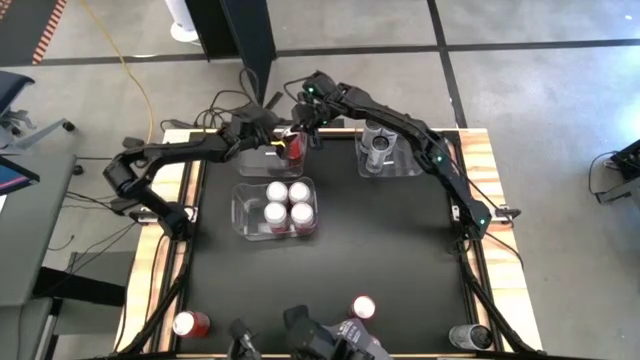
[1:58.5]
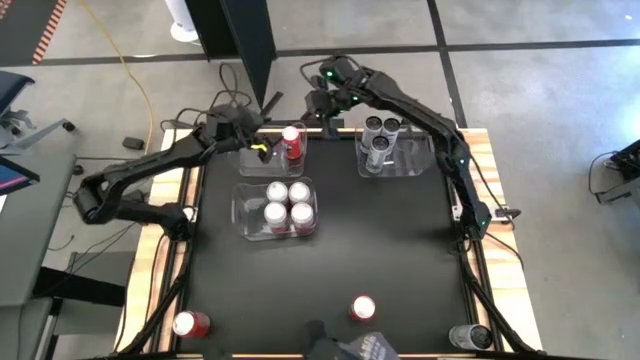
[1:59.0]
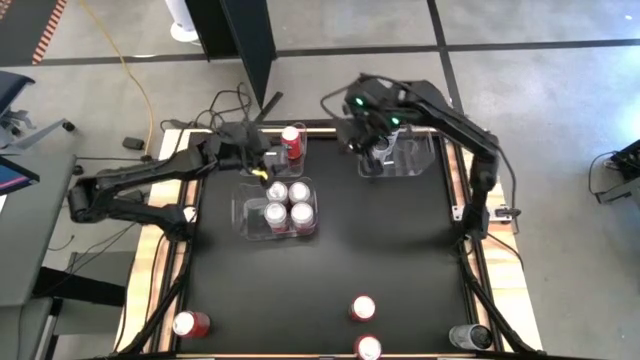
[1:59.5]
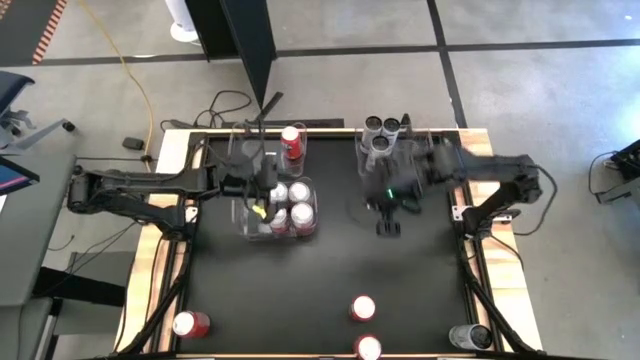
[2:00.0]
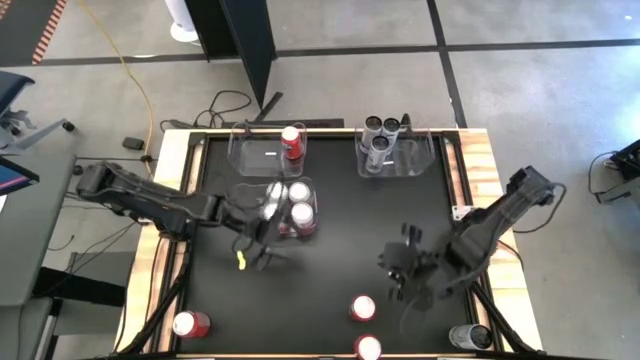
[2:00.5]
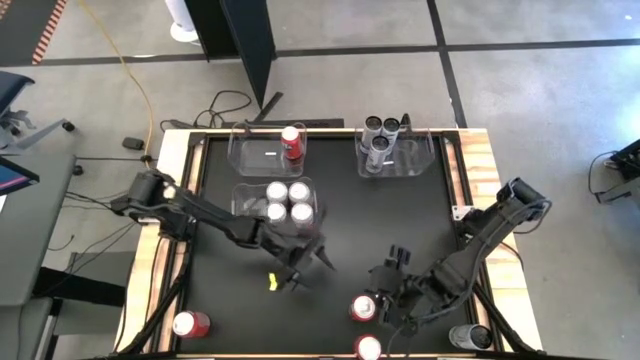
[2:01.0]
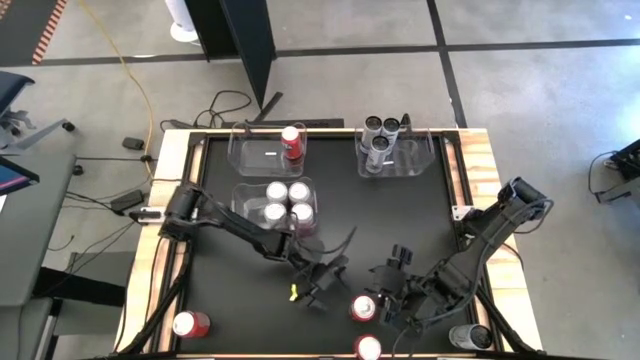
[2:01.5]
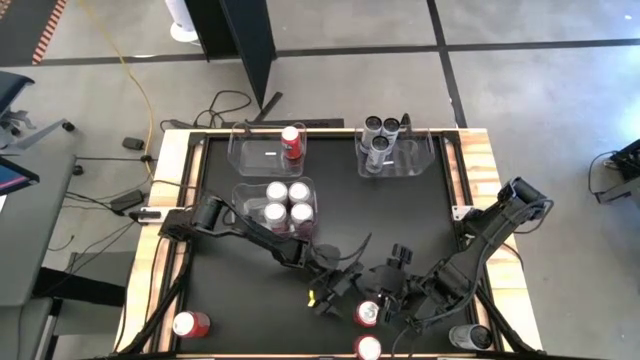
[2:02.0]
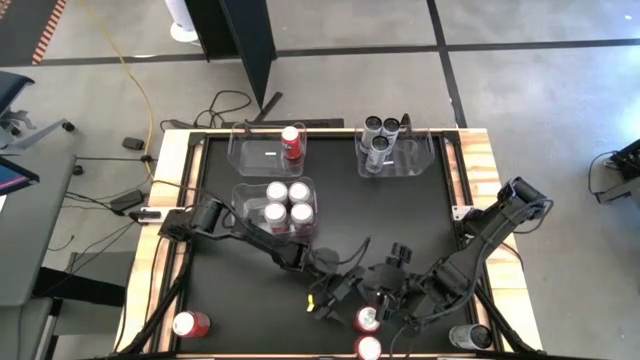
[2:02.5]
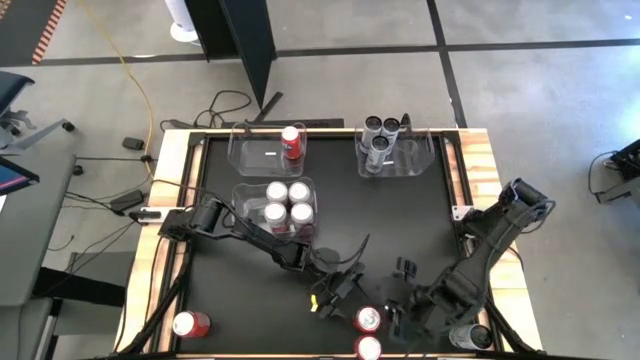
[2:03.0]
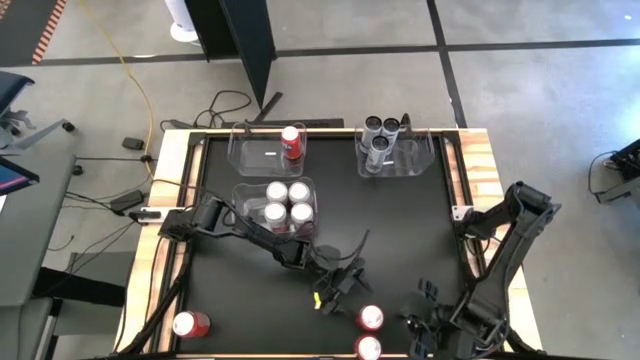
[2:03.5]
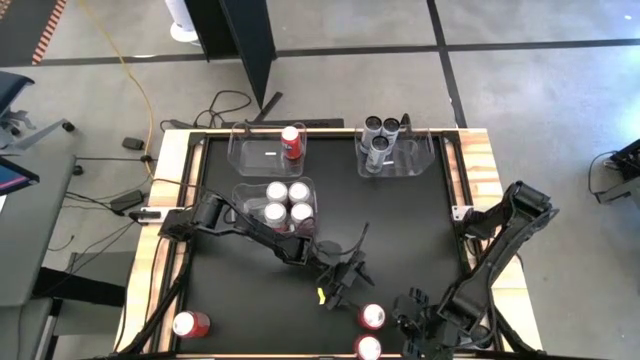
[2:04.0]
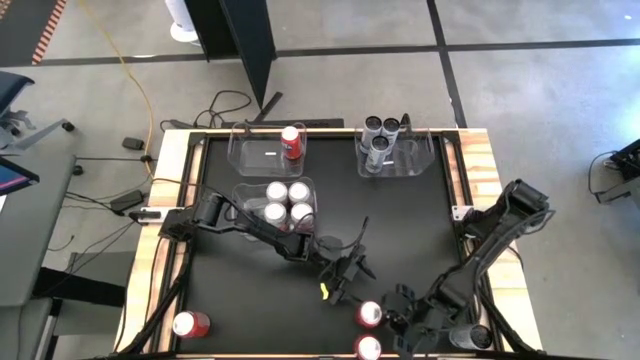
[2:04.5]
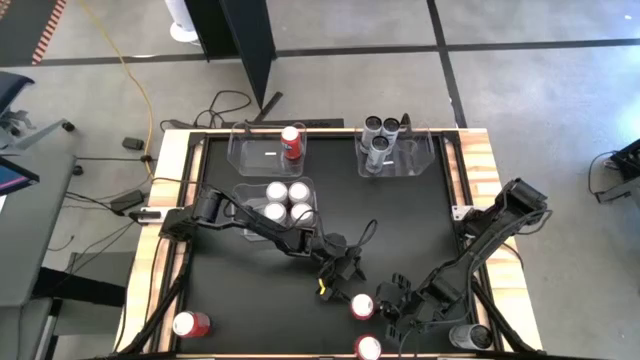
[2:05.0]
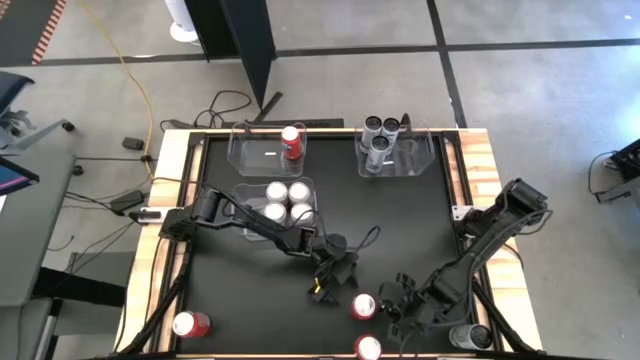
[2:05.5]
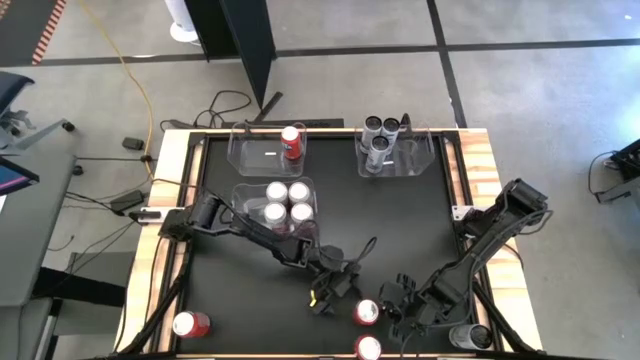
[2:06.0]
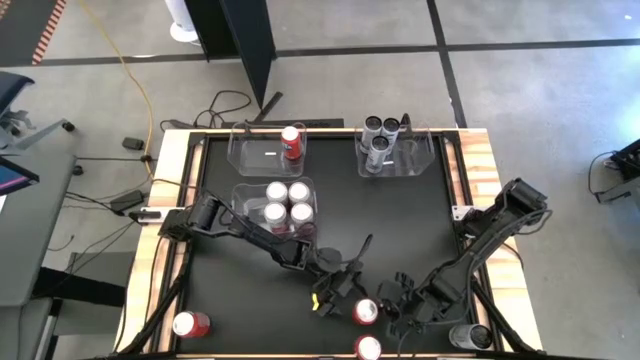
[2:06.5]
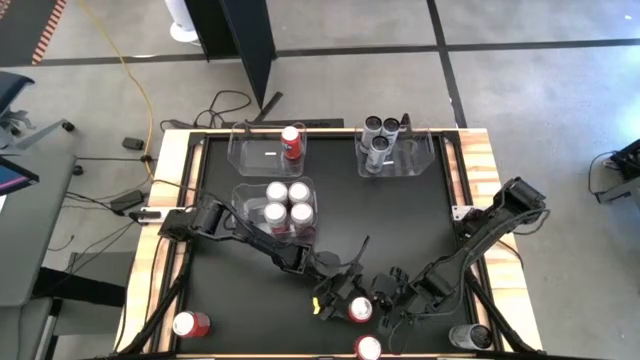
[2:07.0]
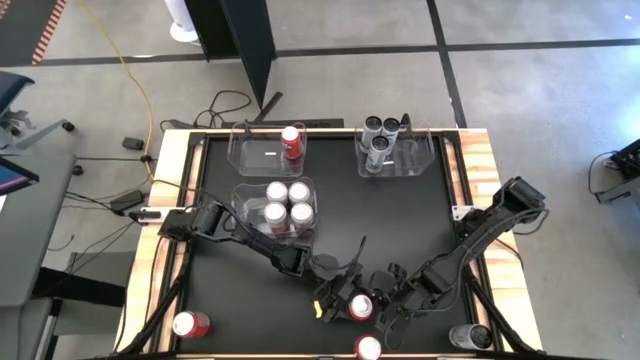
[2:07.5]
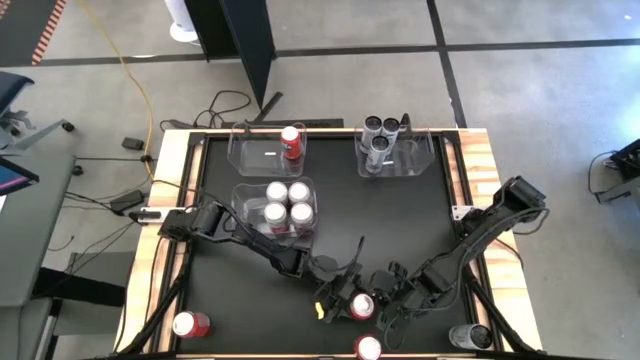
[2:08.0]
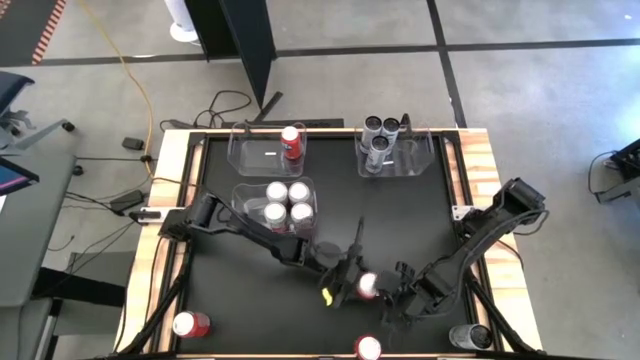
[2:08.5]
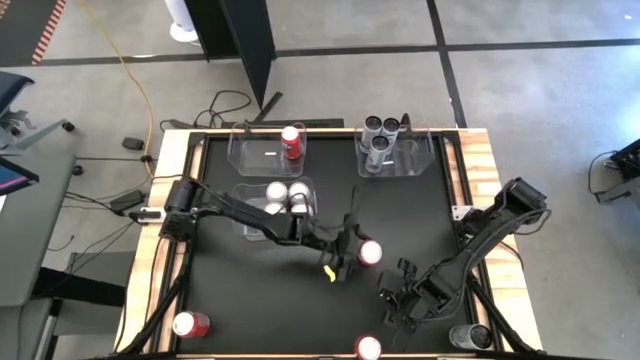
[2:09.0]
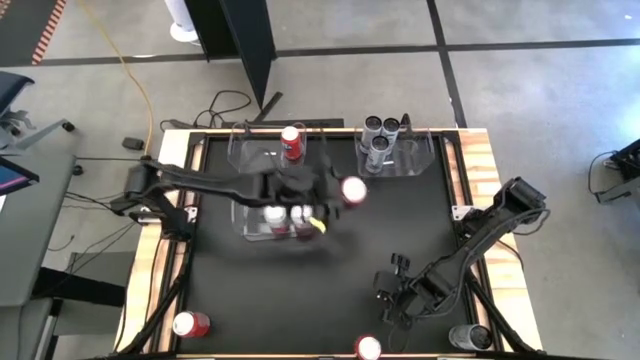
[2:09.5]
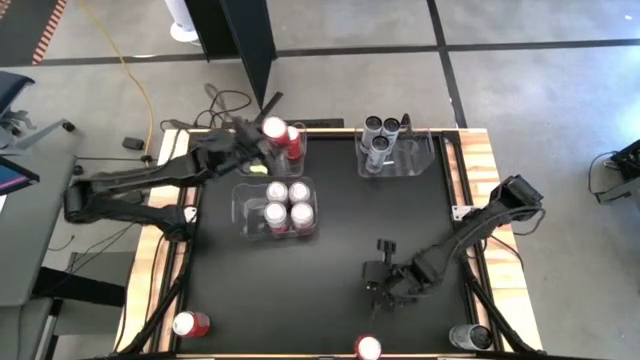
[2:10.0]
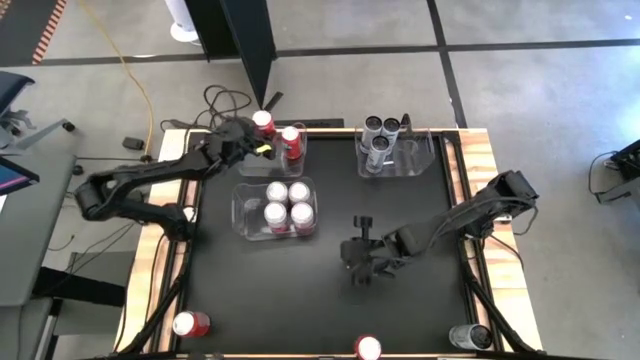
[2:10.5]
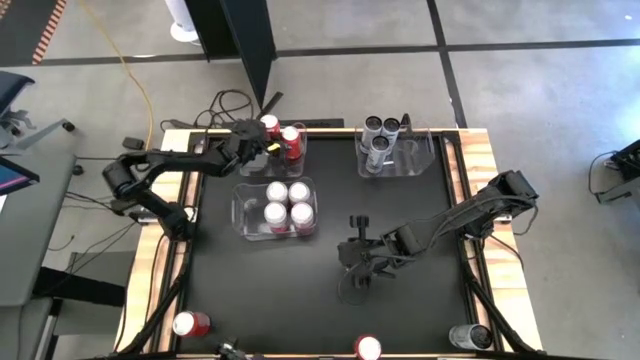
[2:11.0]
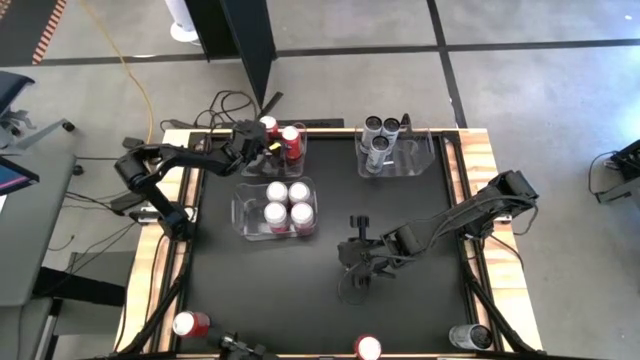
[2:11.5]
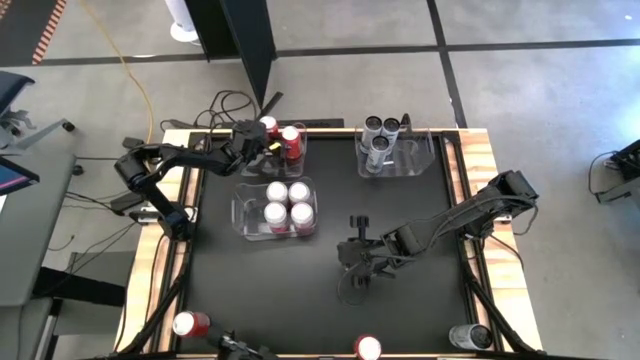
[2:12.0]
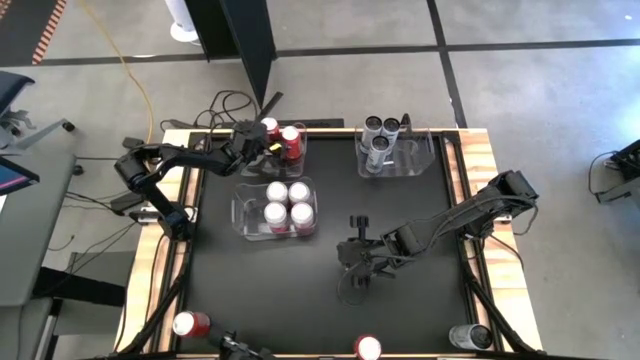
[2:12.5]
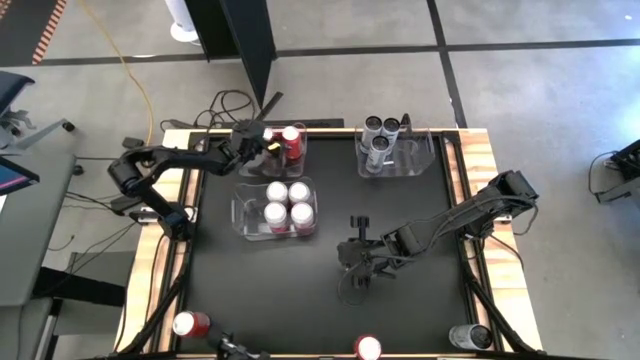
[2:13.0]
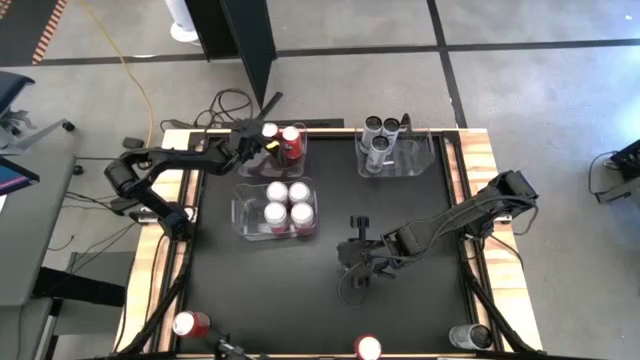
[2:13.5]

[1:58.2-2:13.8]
Task: Sort soda cans
Put the top orange soda can into the top left transparent bin

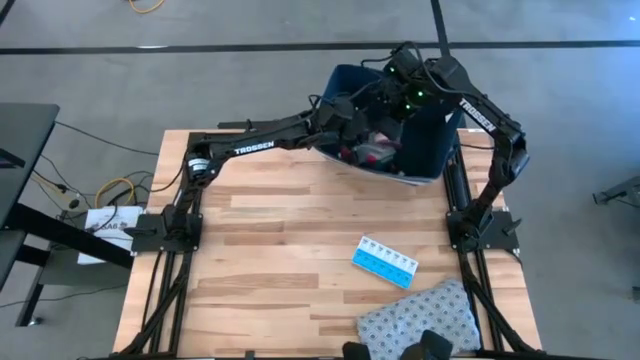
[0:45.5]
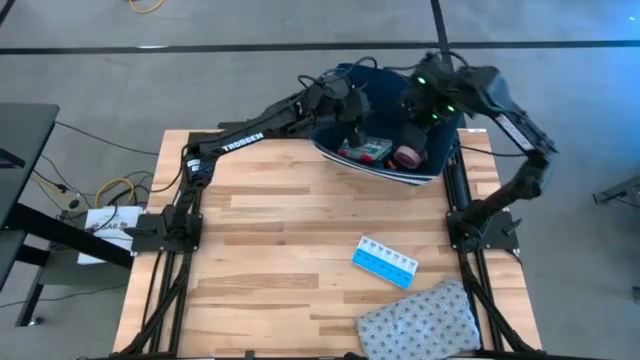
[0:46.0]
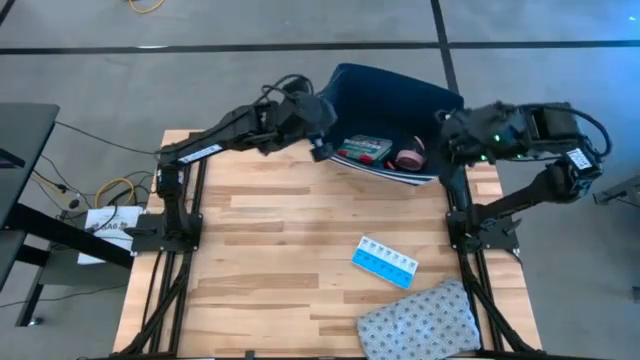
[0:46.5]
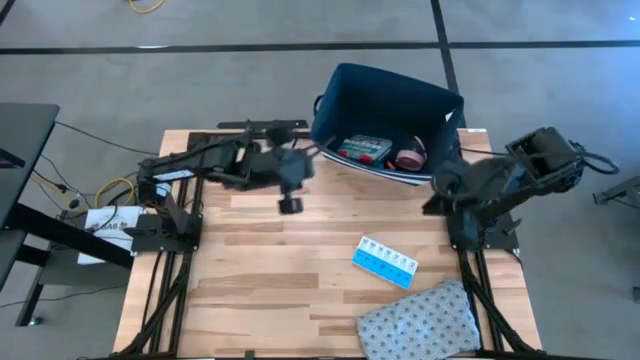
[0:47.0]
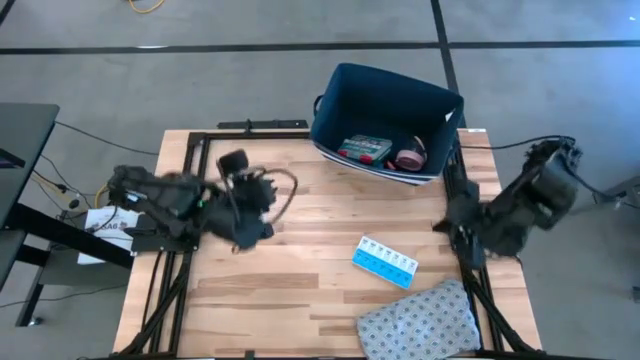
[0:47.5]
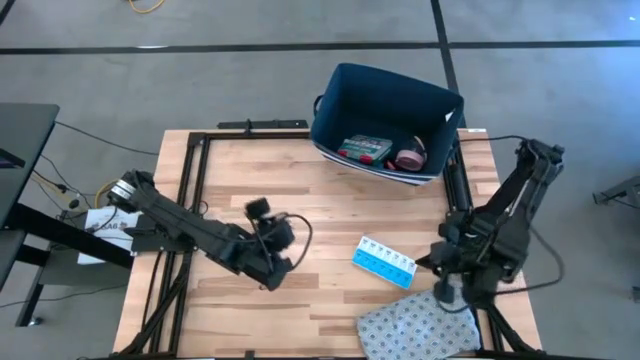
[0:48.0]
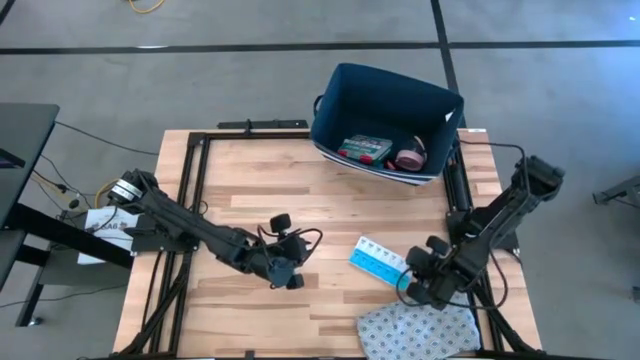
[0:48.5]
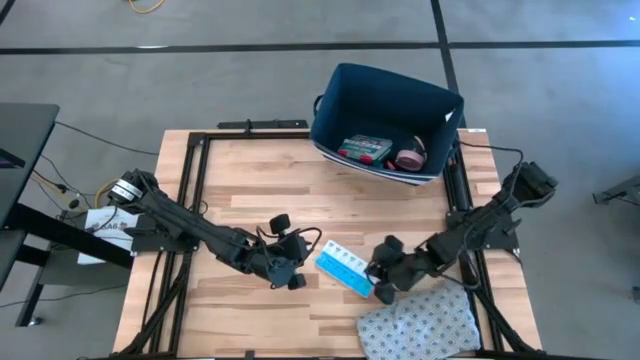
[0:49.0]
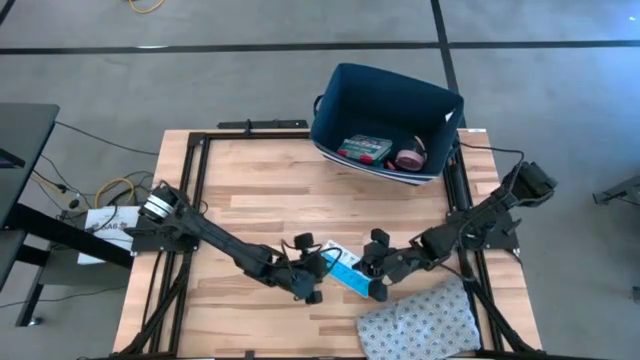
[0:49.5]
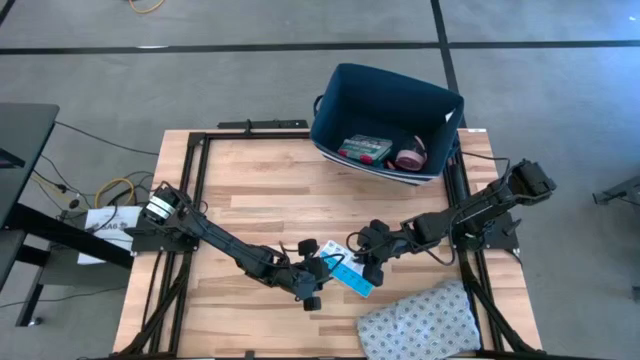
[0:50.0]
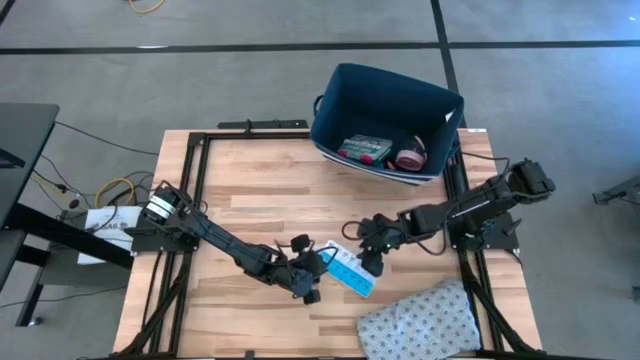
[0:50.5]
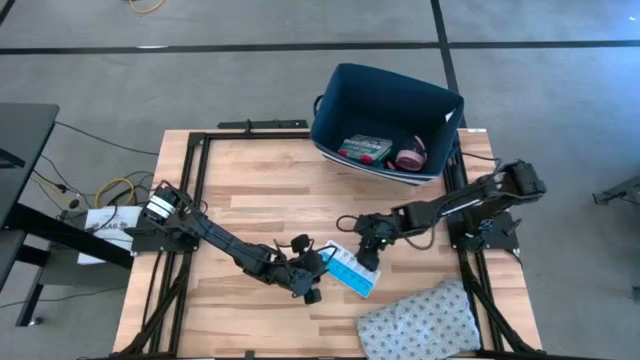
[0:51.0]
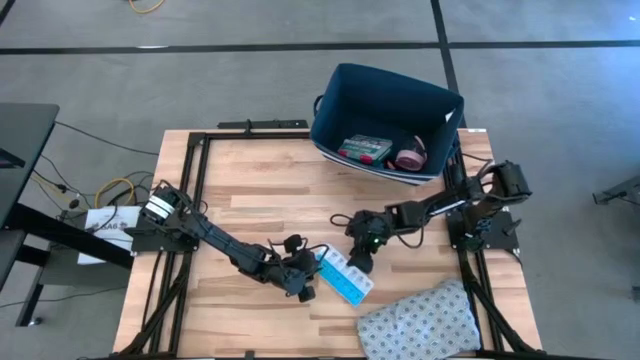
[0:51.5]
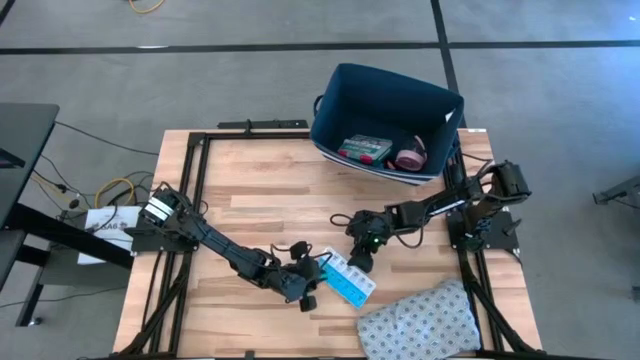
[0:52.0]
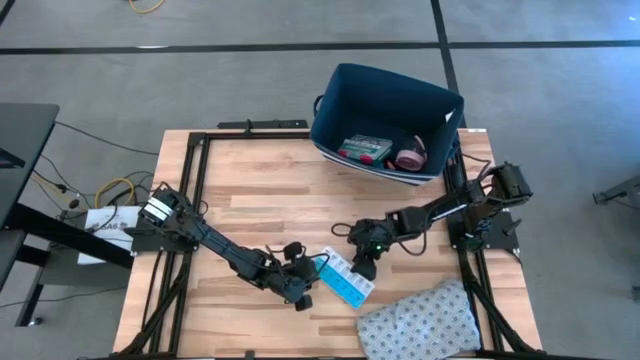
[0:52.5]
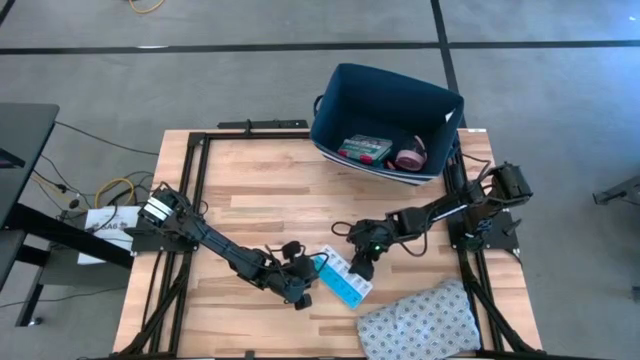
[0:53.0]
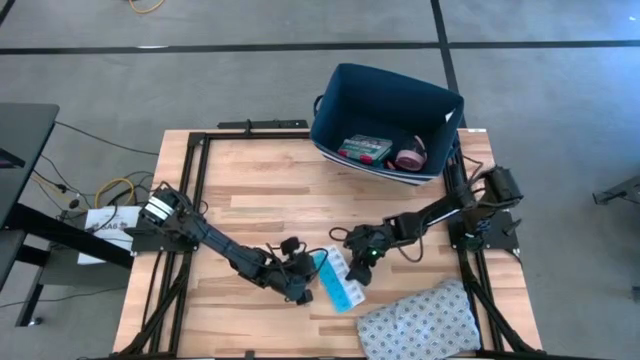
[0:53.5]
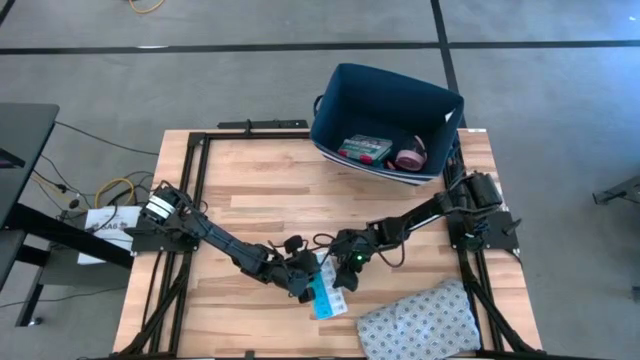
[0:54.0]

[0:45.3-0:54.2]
Task: Pick & place medical supplies in basket/bin
Put the pill organizer into the bin
